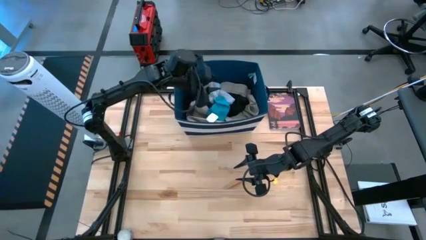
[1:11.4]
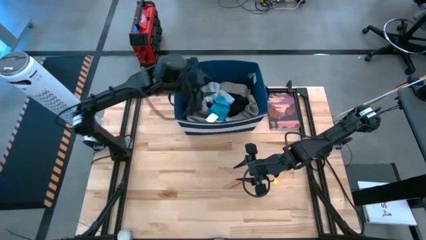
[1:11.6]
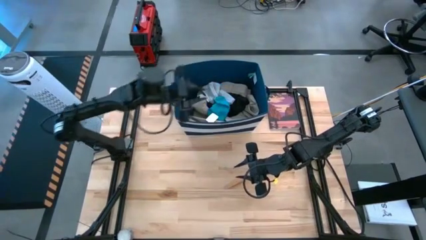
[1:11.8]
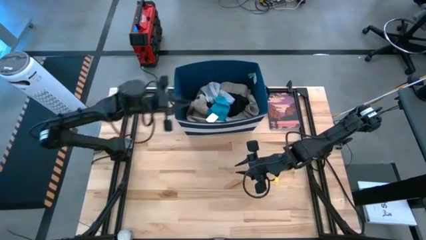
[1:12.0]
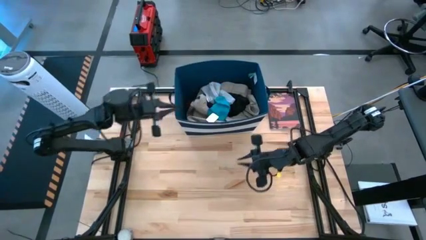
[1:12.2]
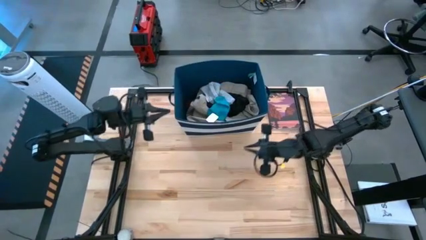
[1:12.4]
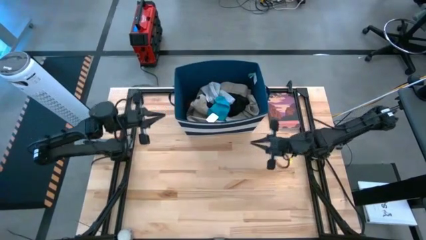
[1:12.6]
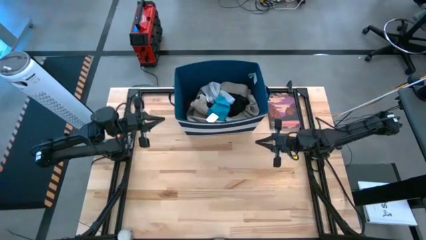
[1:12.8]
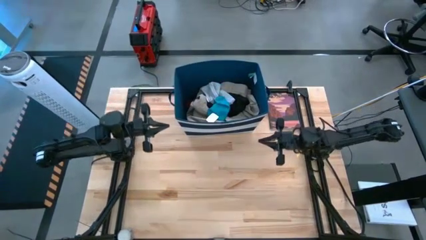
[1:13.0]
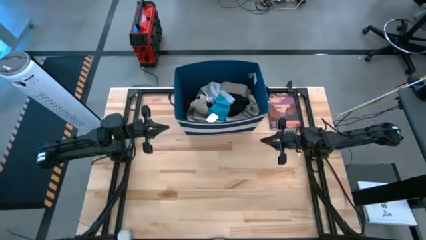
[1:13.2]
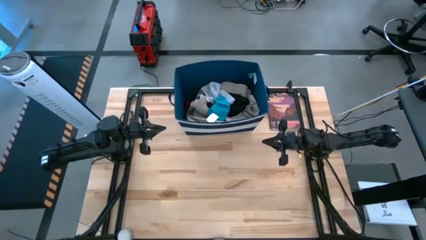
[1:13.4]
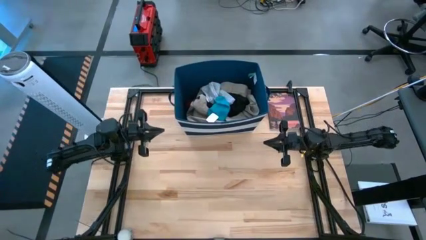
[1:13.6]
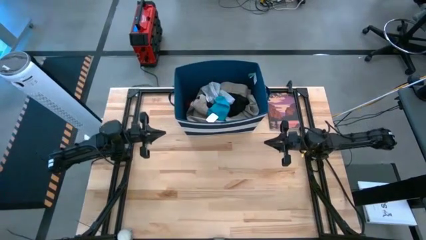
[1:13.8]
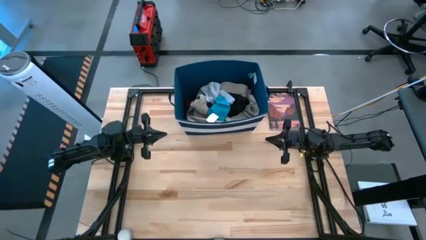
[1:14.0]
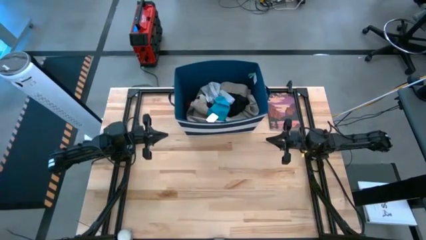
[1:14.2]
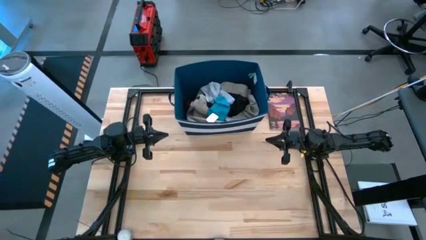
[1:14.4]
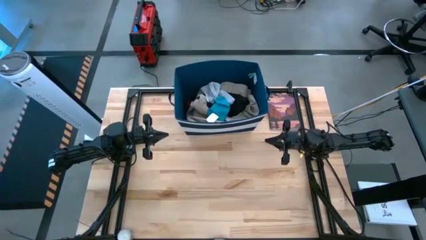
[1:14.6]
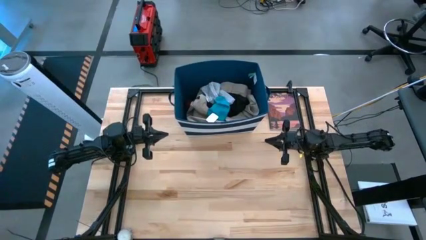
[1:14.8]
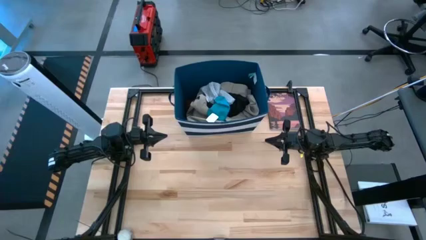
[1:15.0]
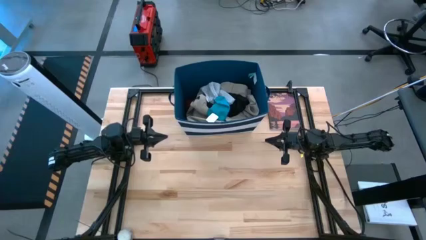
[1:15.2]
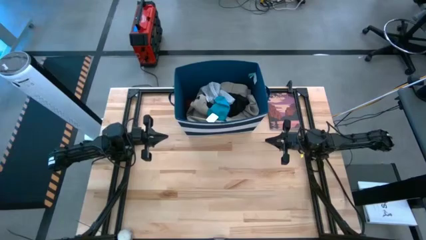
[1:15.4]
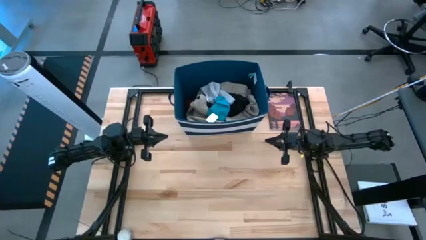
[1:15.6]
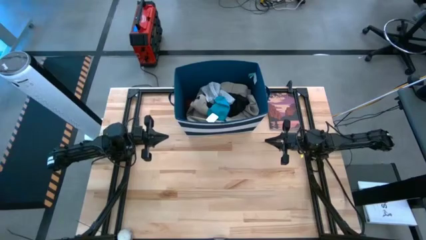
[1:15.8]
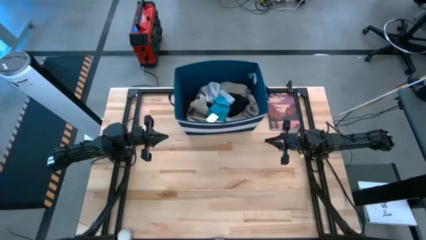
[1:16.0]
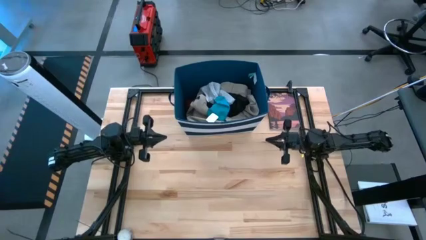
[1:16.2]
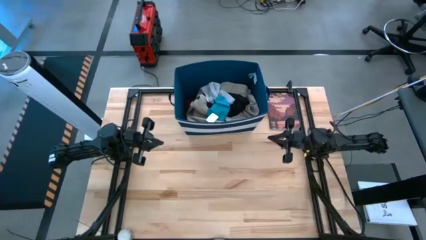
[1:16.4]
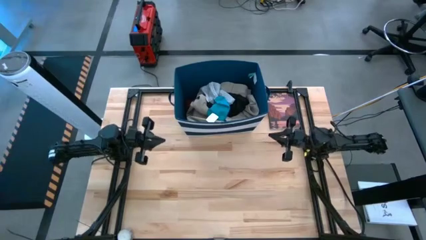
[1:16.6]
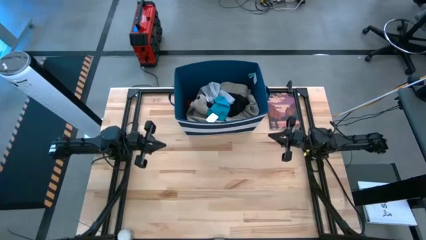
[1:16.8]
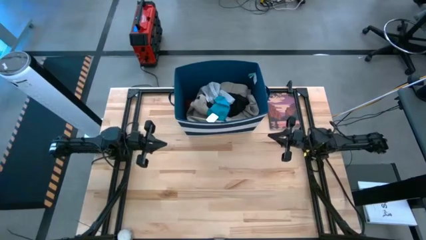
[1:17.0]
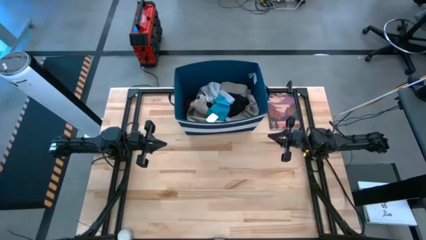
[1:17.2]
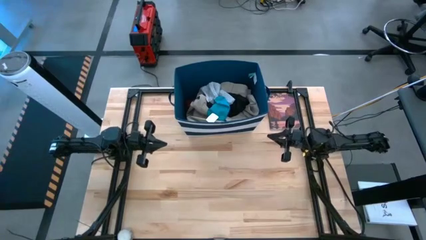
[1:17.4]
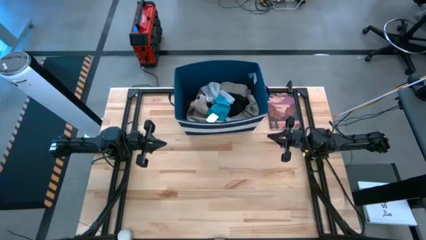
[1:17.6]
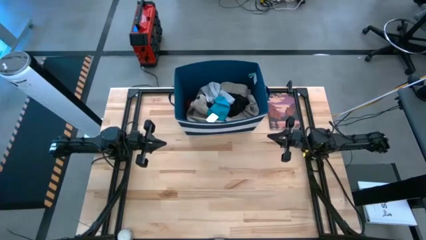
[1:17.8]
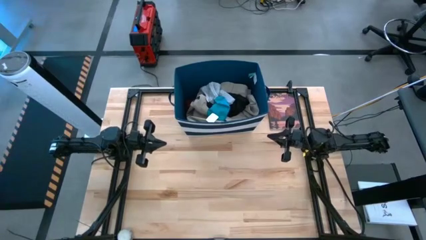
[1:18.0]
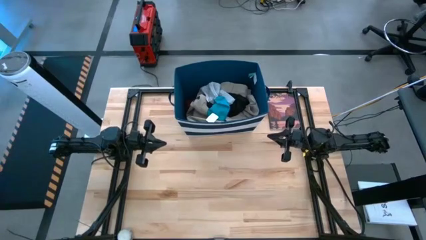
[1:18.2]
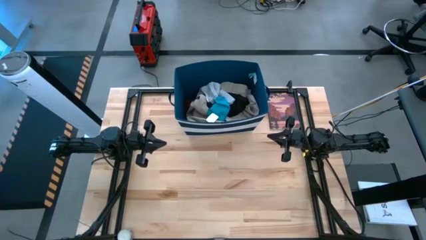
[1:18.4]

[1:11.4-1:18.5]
Task: Sort clothes
Return to Home Position

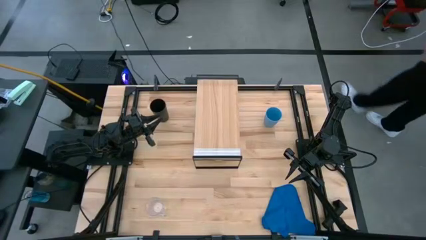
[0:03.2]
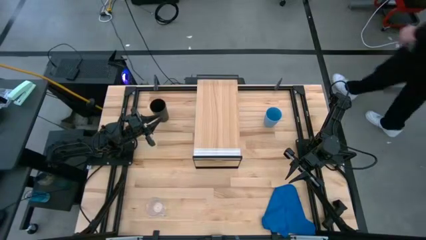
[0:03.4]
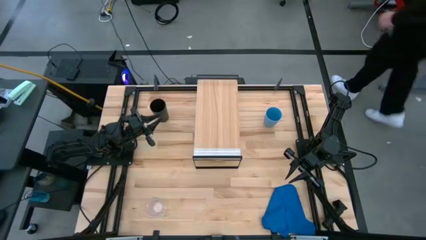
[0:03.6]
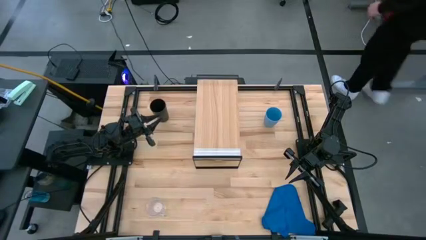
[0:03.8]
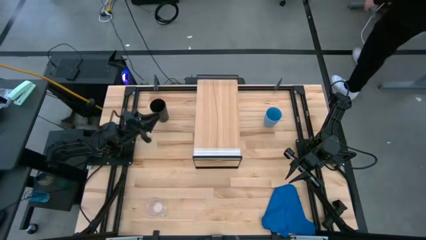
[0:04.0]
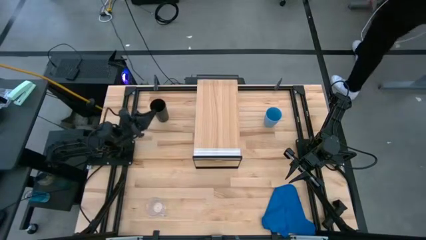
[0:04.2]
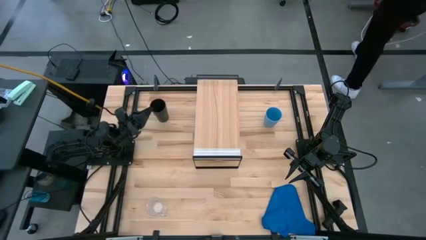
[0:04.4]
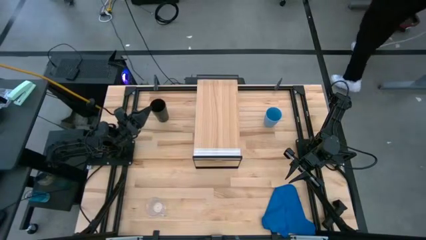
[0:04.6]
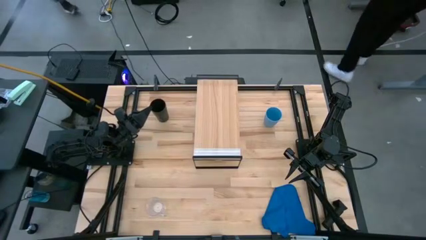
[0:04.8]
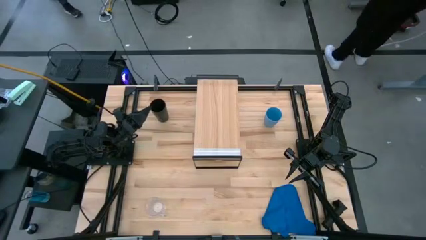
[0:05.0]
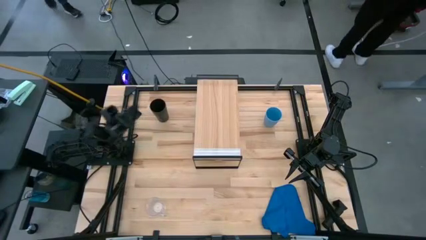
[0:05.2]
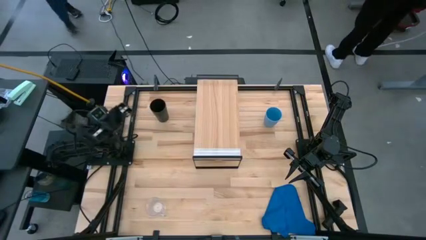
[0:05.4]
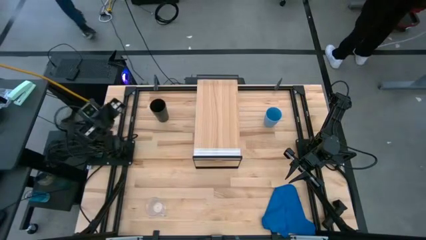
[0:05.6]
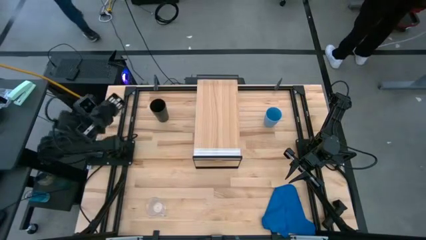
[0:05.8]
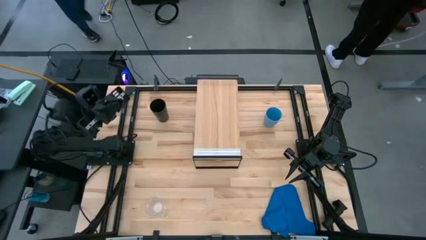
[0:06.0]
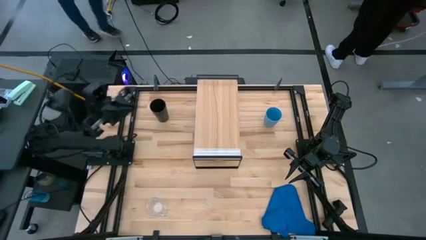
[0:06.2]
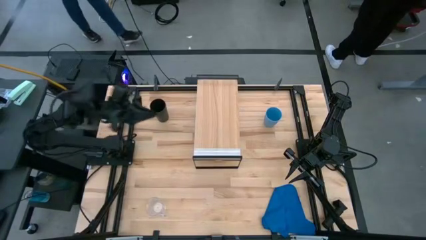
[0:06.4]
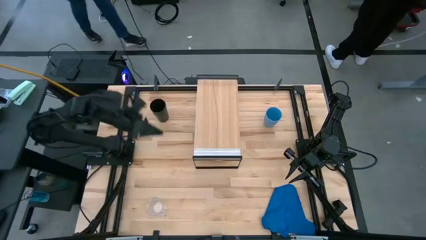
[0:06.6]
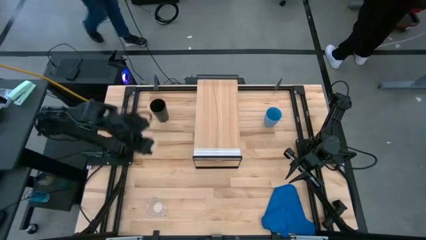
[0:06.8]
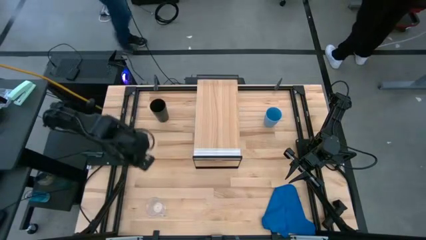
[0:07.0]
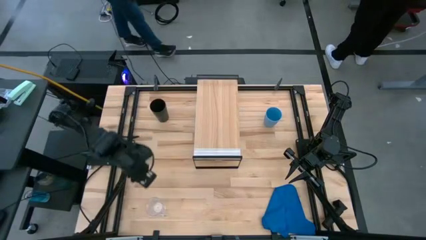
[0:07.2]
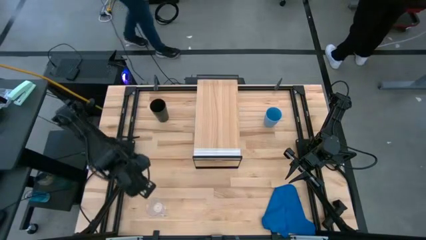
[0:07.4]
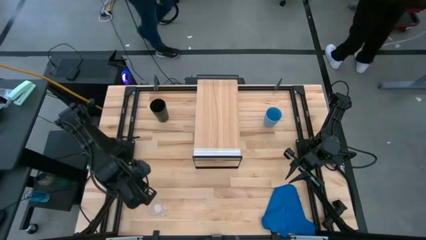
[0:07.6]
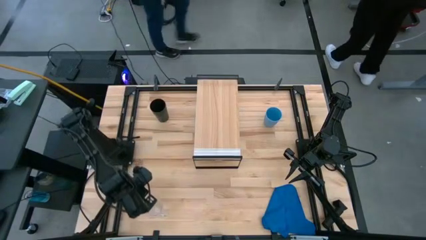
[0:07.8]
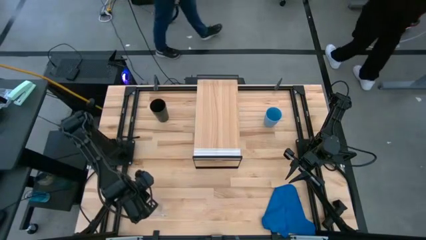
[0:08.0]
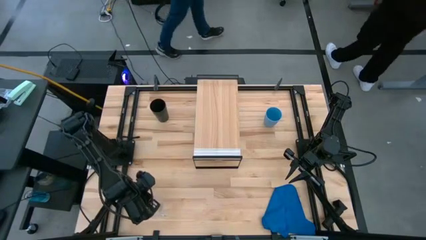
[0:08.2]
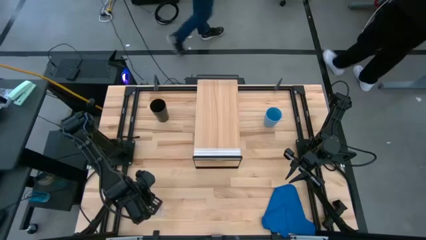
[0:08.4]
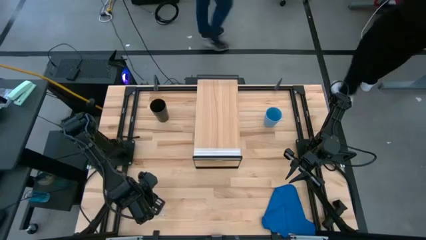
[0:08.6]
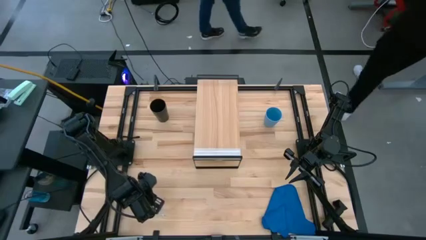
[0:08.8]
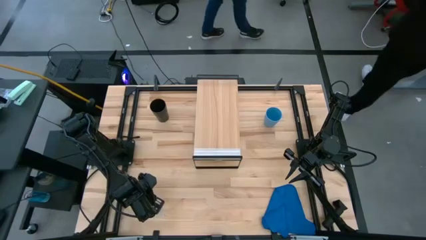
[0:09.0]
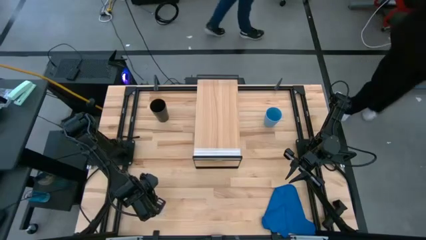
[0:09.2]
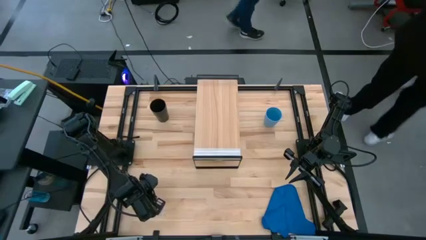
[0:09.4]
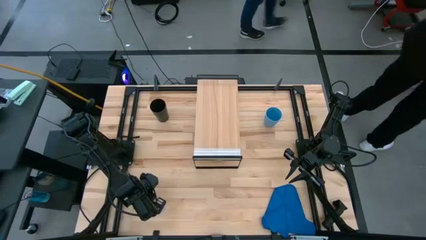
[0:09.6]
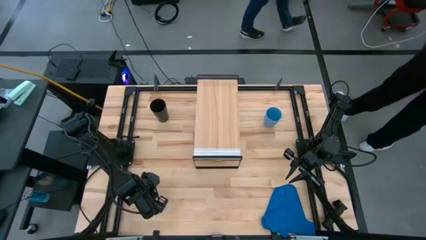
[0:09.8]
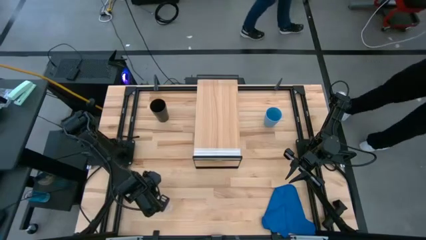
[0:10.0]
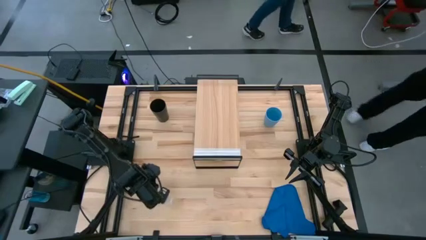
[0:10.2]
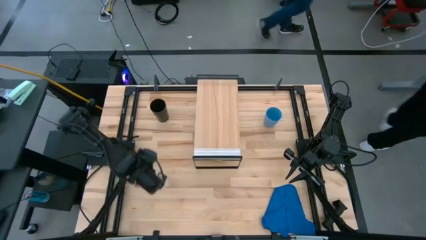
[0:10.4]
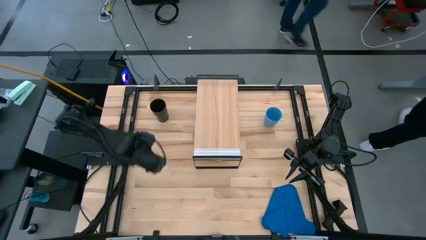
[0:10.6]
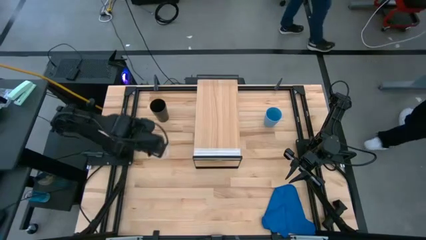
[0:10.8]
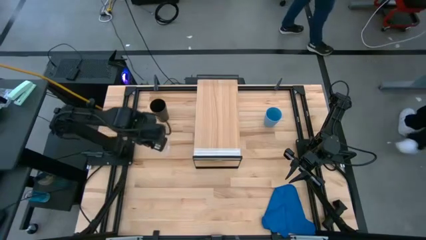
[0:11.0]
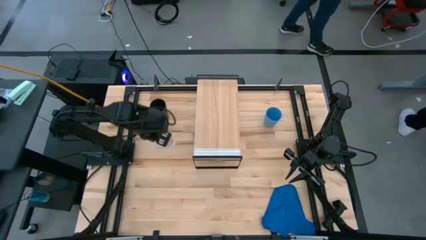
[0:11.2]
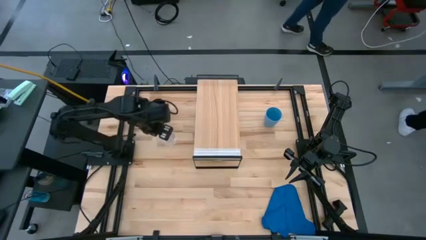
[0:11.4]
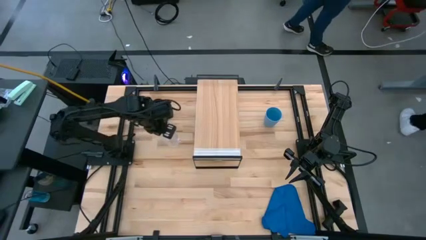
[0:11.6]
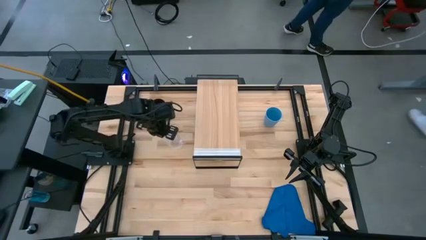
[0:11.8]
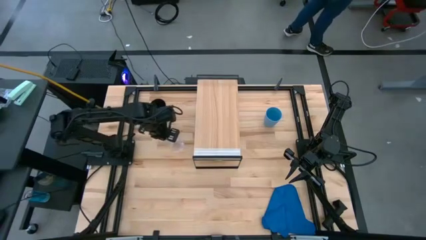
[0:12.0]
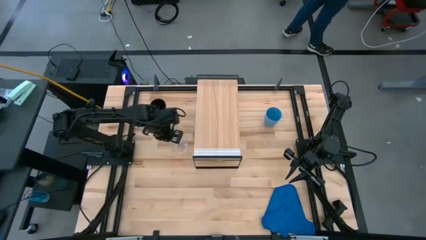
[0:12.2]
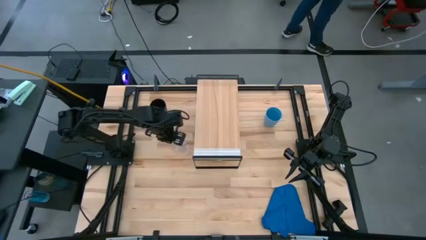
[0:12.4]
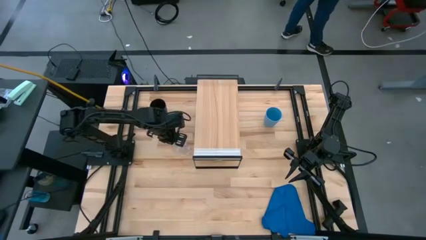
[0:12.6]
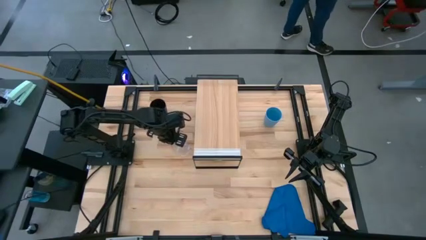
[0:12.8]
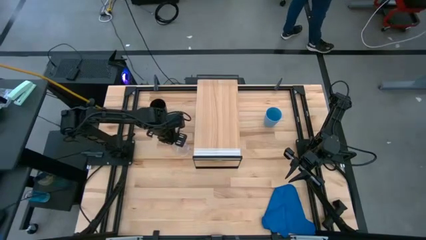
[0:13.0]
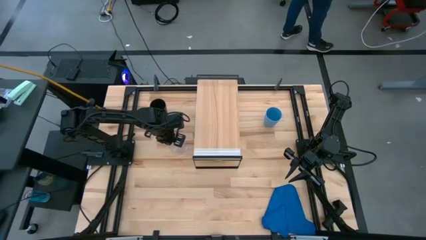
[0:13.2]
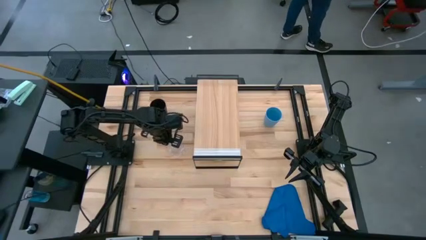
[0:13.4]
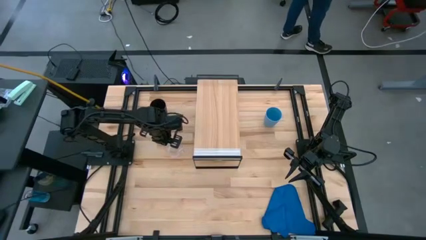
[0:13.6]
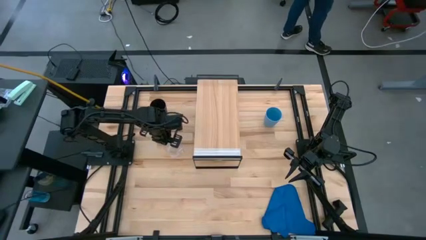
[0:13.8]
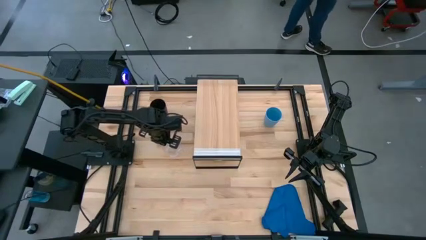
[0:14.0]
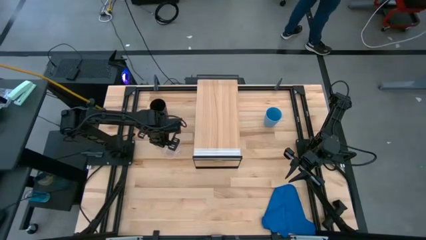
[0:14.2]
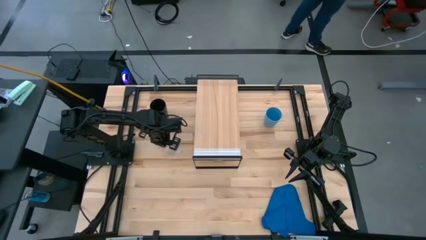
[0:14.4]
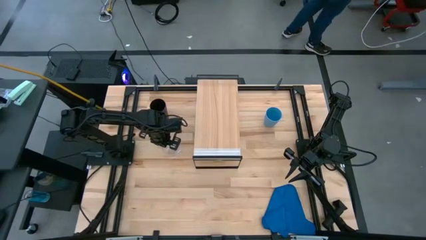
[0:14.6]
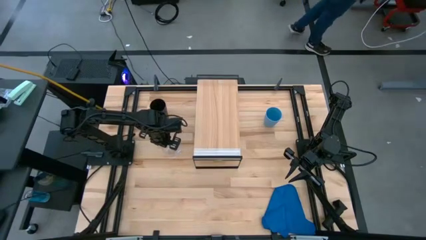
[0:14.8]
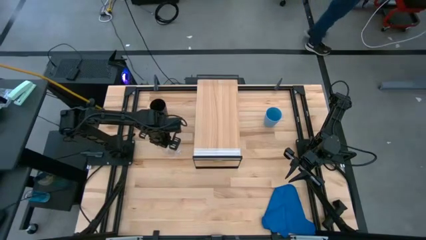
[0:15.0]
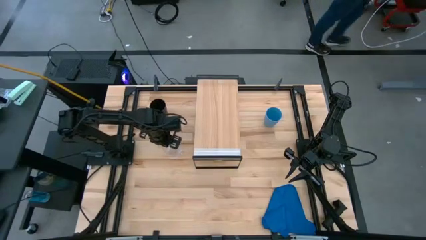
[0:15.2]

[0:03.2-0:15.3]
Task: Stack small to large cups/mugs on shelf
Move the transparent mug to the middle left of the table
